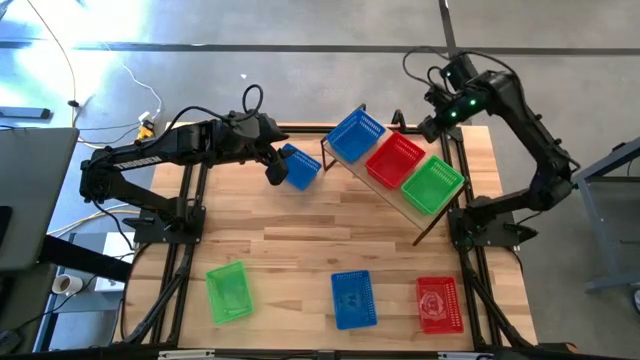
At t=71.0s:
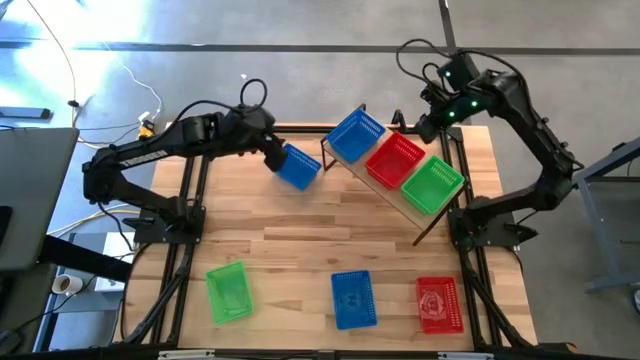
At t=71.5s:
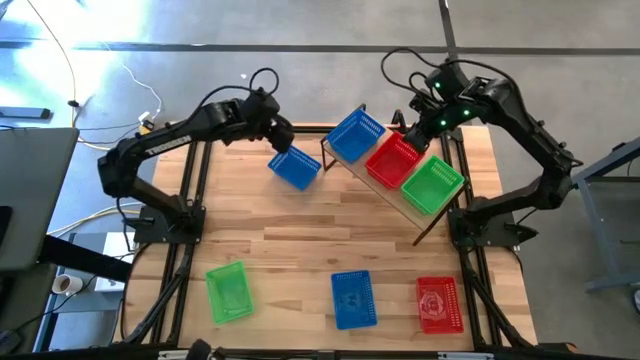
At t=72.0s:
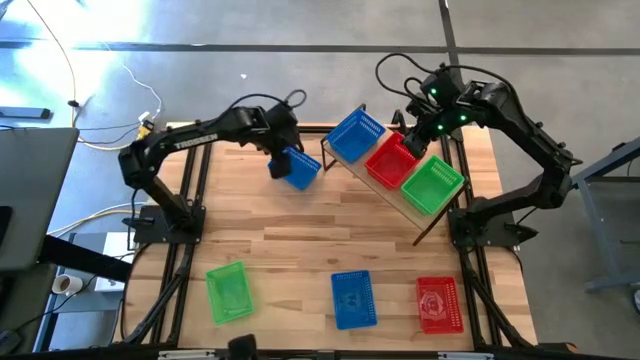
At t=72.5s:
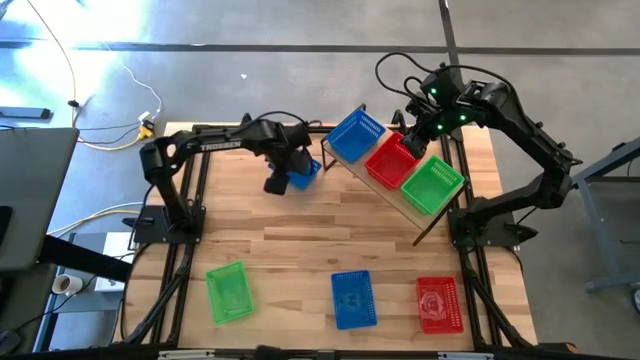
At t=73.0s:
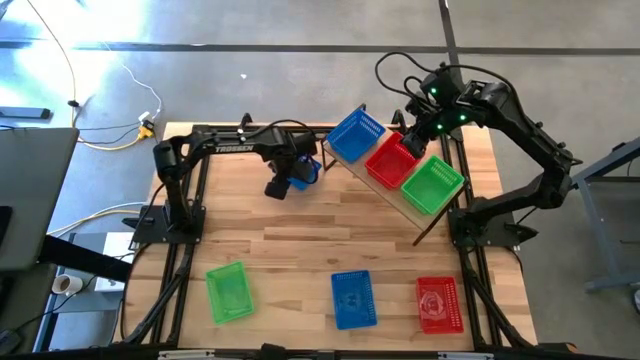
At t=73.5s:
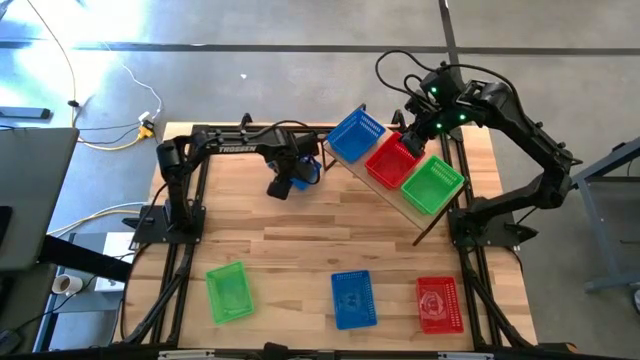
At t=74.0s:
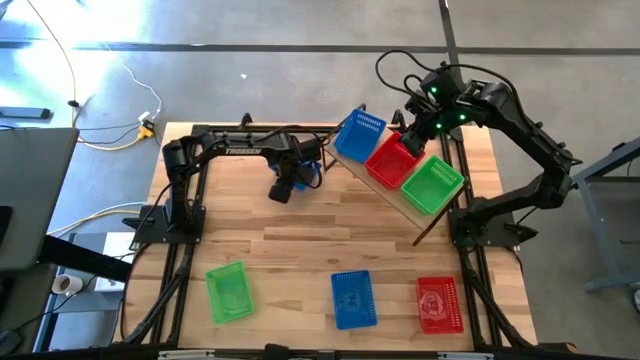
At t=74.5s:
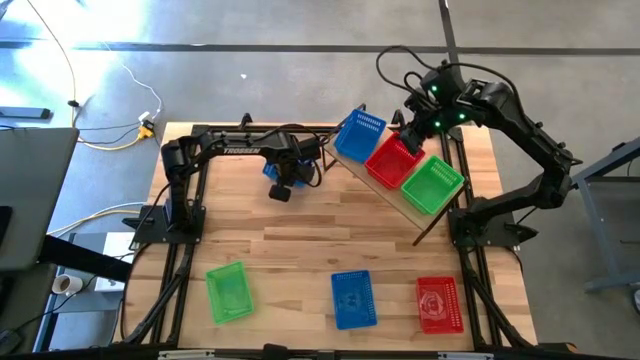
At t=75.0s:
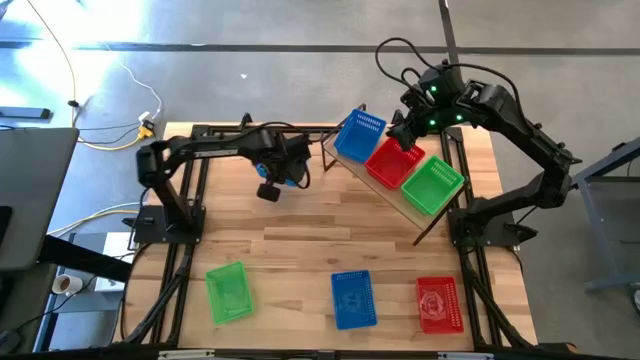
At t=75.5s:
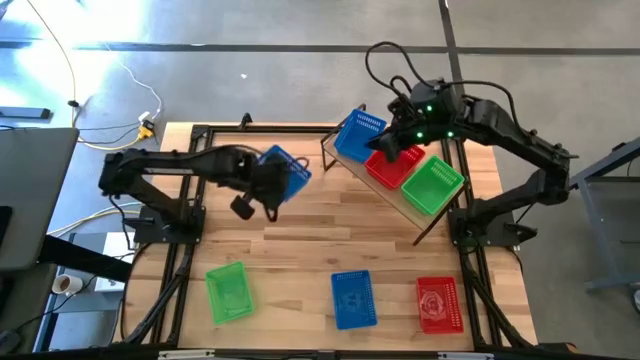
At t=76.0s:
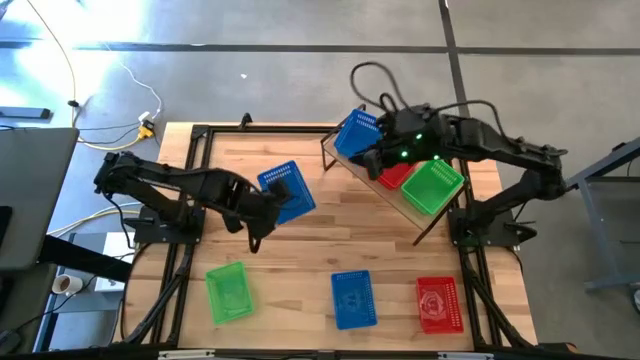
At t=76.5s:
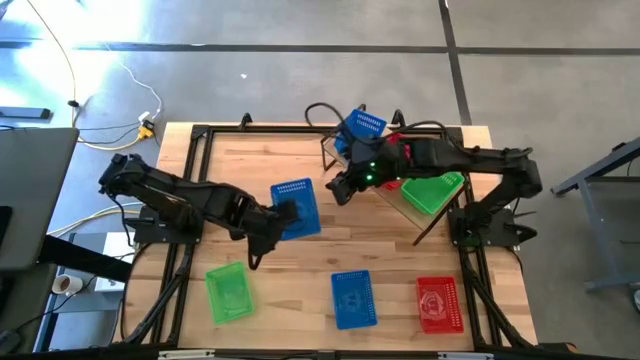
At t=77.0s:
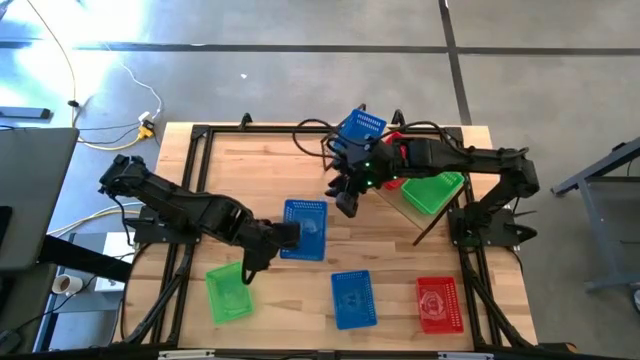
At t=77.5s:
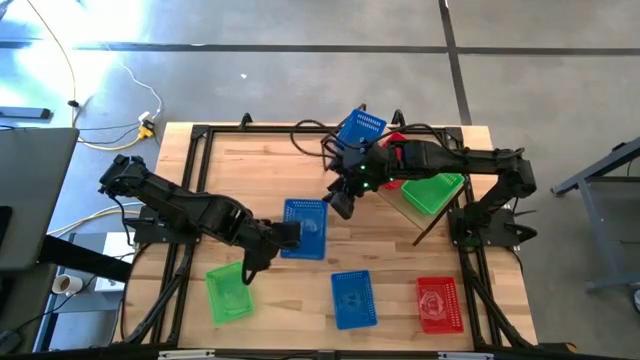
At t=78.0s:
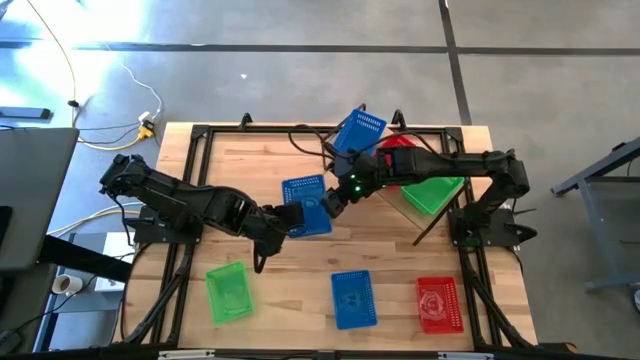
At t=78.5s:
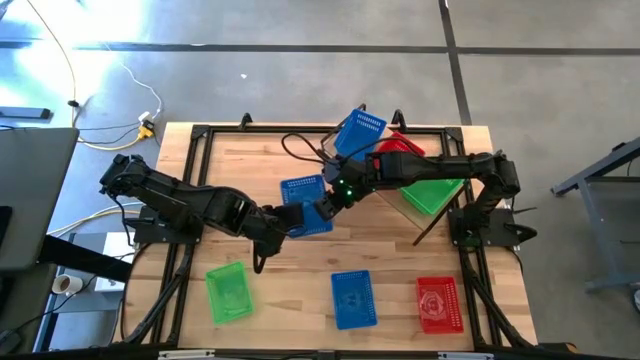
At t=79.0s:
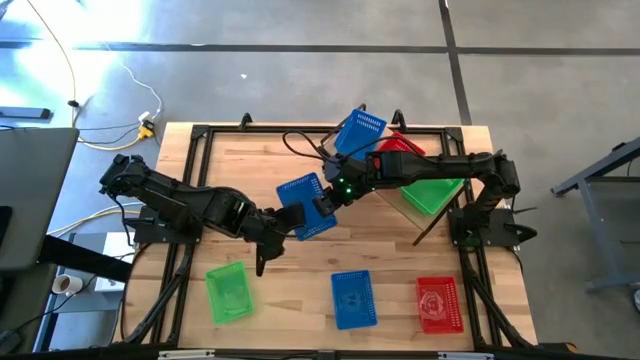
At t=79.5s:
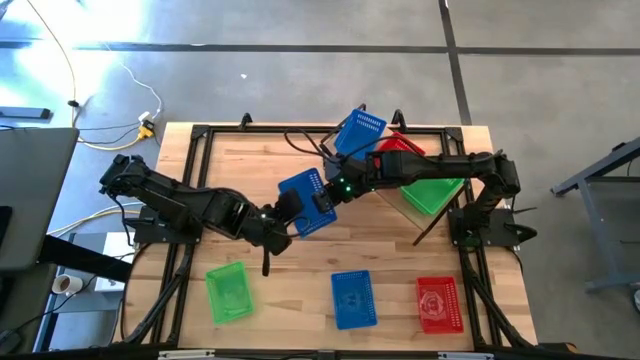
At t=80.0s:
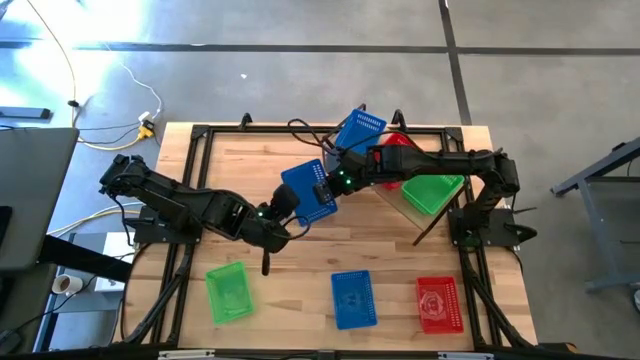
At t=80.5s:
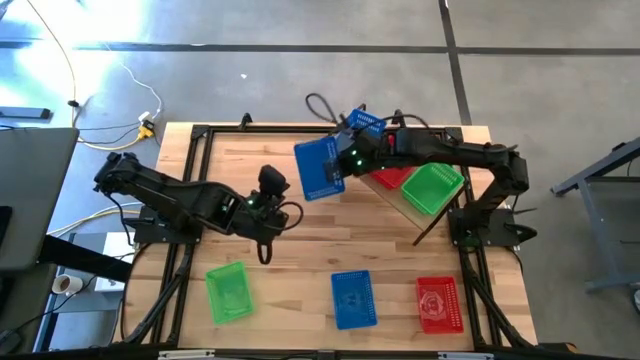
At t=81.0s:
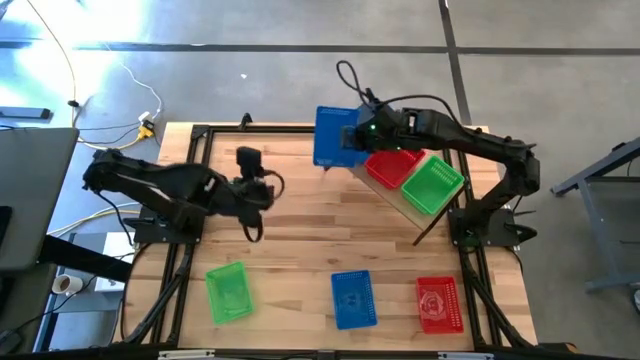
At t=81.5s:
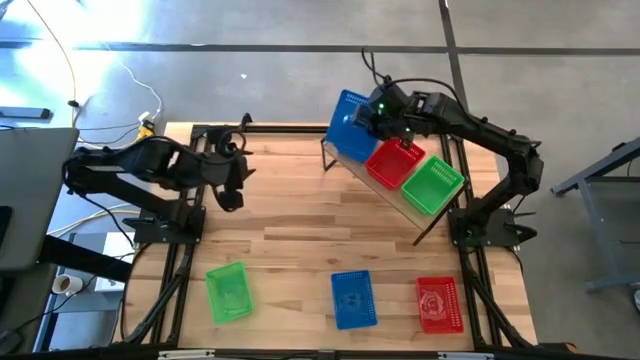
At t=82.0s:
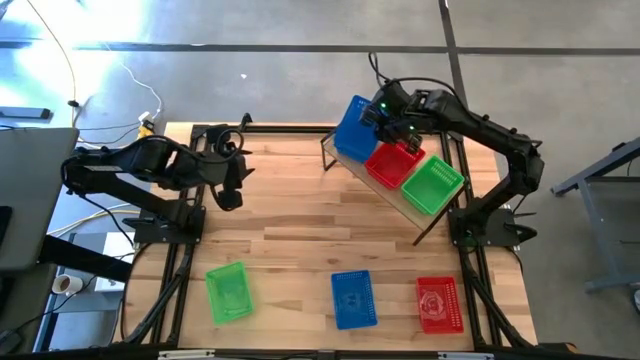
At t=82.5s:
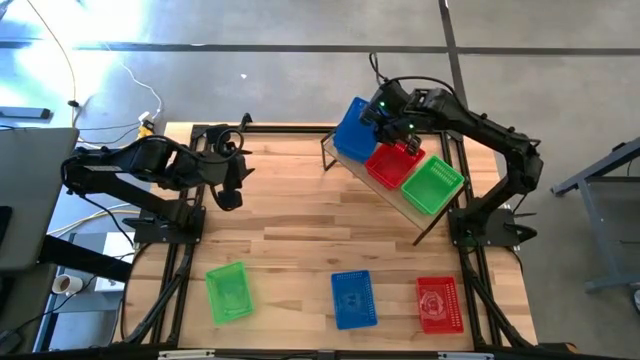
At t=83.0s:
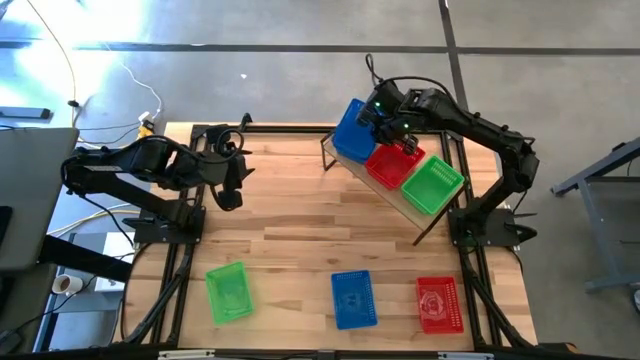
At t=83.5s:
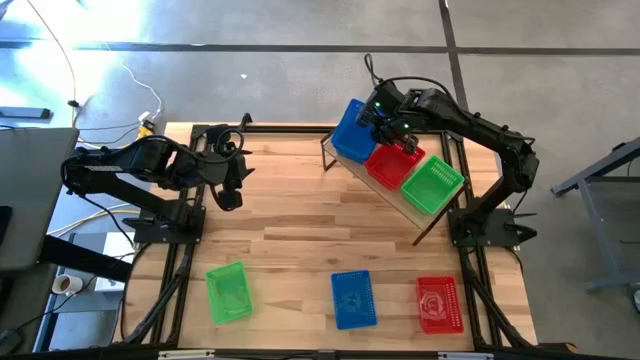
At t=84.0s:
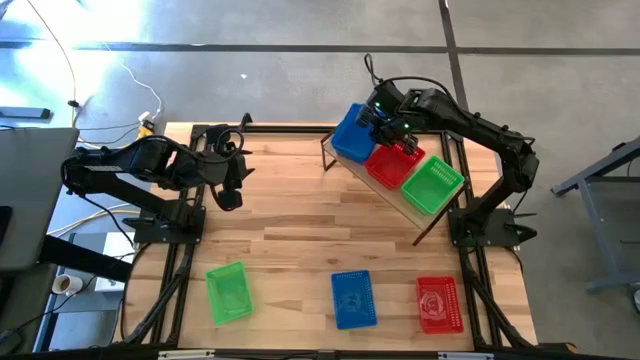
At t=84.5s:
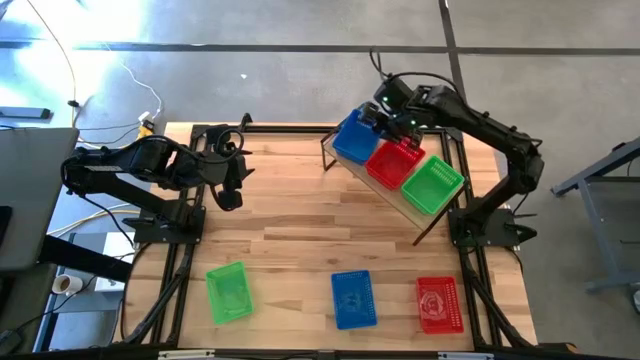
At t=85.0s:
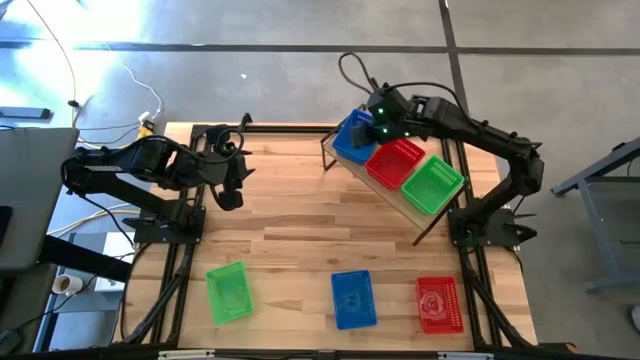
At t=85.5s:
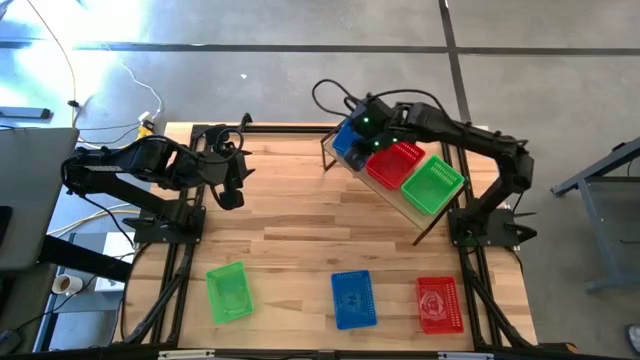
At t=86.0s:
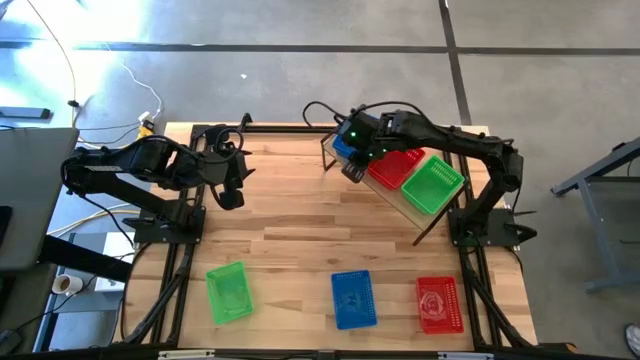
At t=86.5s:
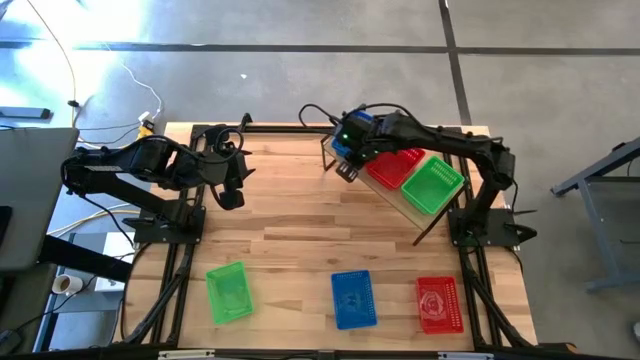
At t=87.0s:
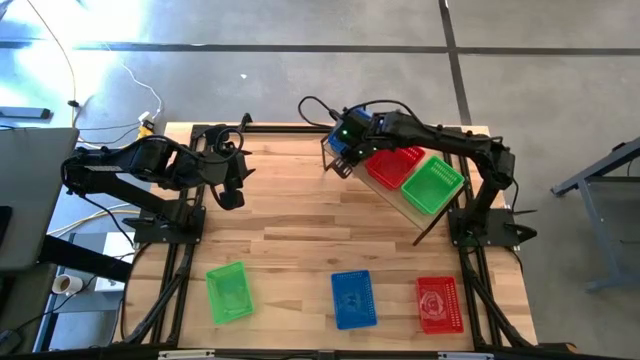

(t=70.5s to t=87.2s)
Task: Stack baskets on shelf by color
Stack the top blue basket on the blue basket on the shelf

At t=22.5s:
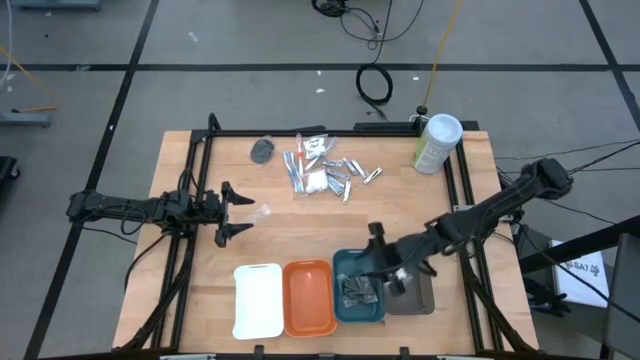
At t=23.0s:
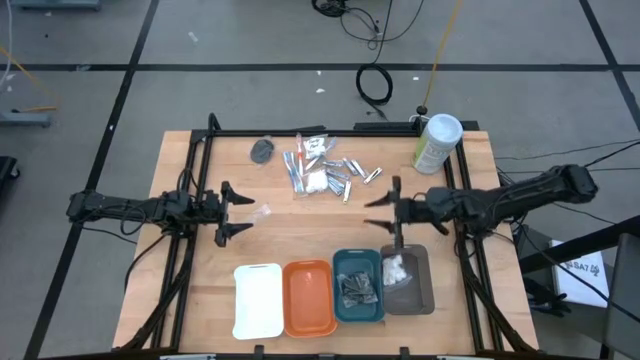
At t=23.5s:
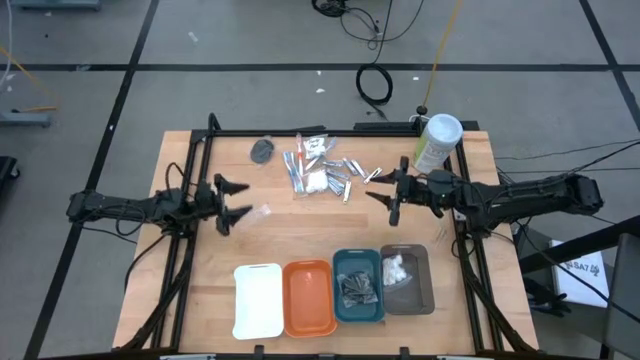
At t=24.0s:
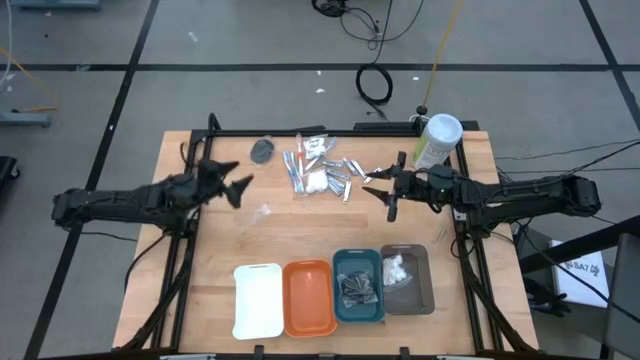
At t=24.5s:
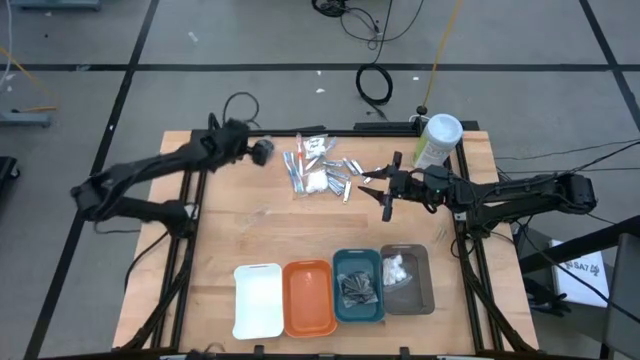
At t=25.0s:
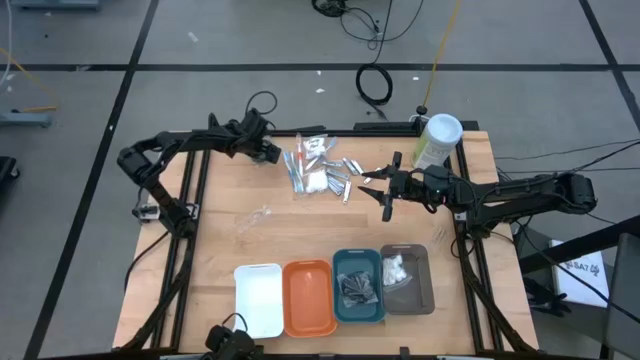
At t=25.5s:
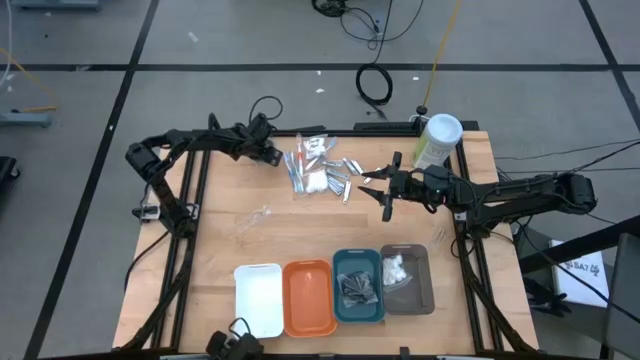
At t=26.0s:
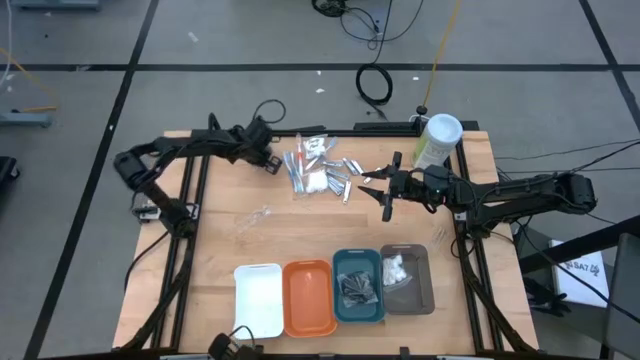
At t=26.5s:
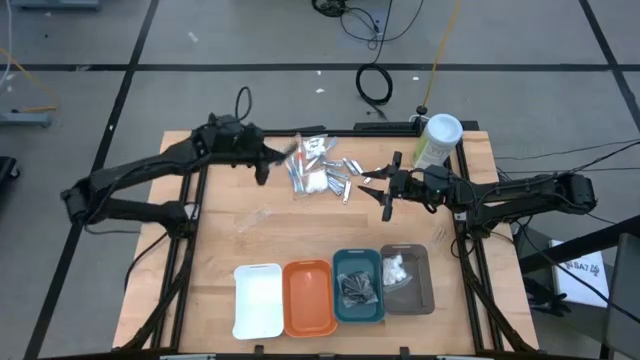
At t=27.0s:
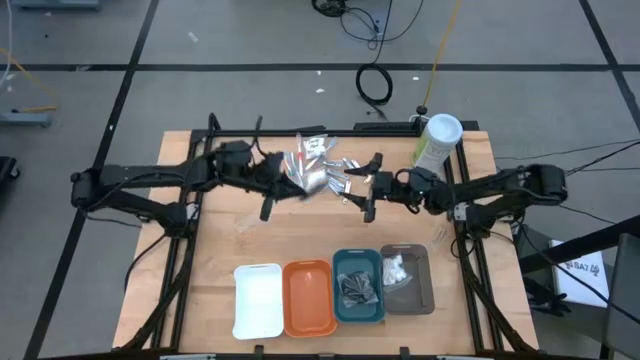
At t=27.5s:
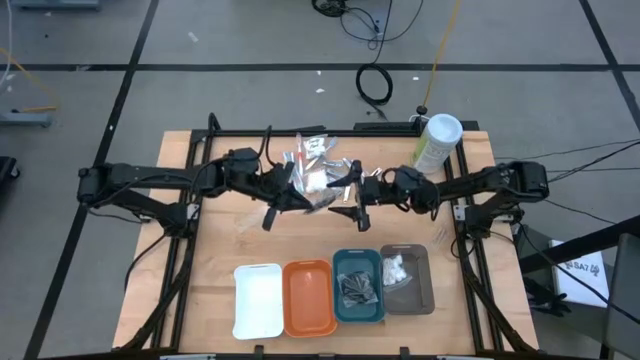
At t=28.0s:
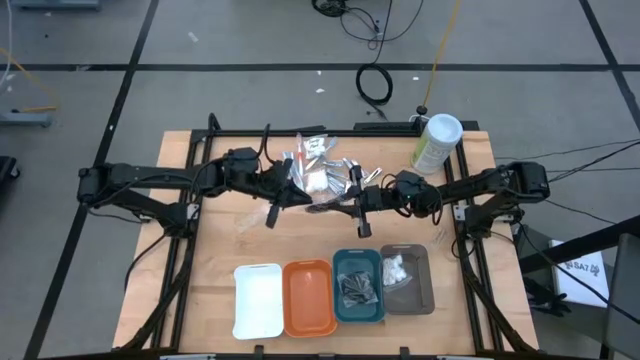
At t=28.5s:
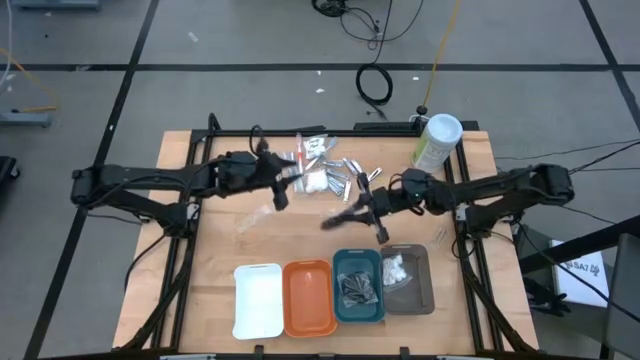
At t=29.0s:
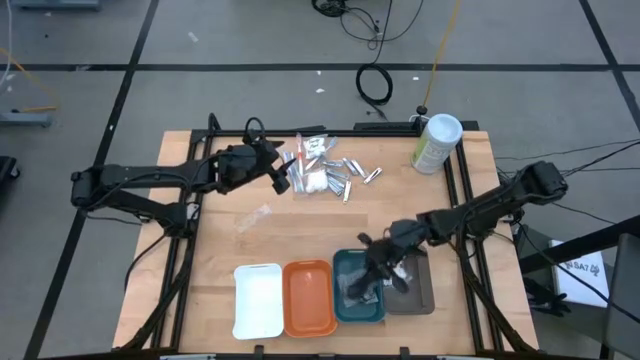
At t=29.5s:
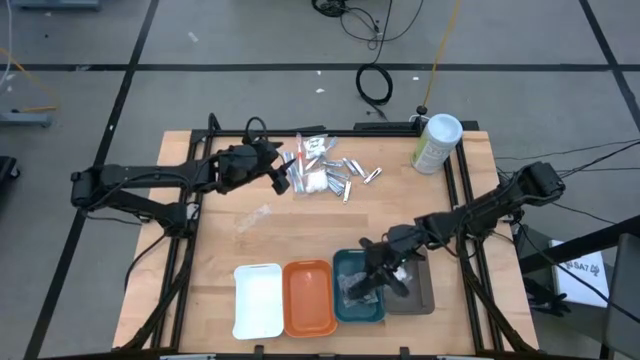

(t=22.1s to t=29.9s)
Task: Pick & Place Travel size toiletries
Put the black hairbrush into the blue bin
